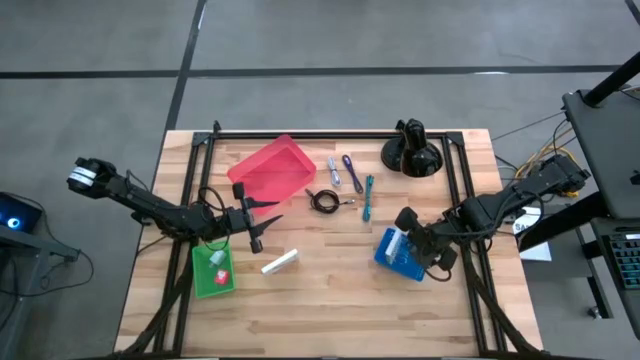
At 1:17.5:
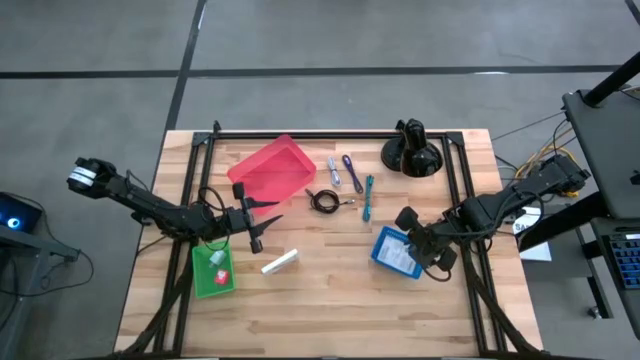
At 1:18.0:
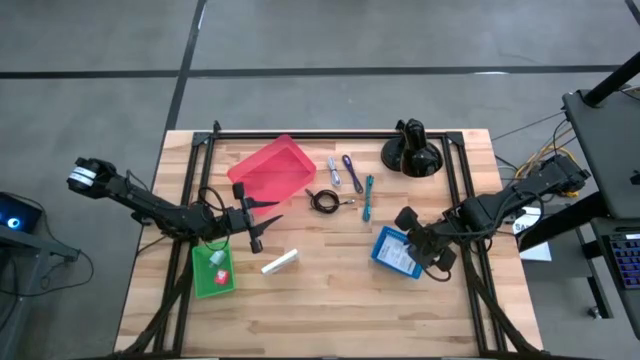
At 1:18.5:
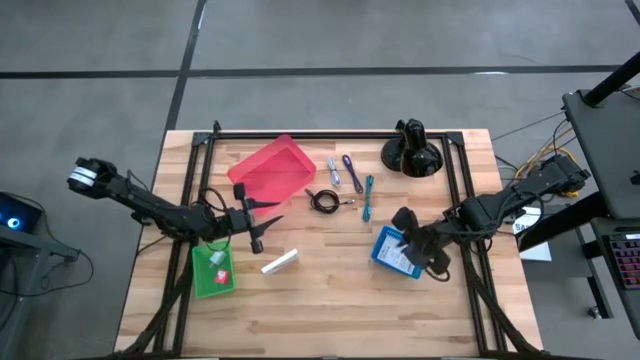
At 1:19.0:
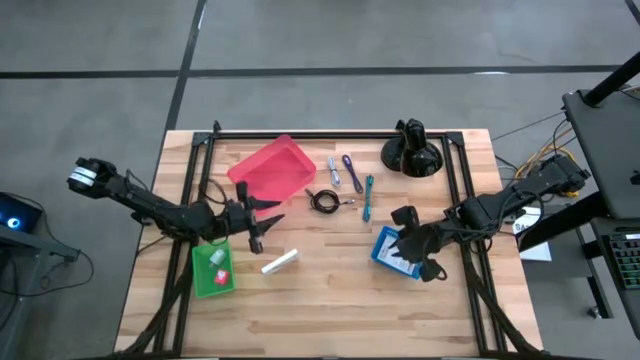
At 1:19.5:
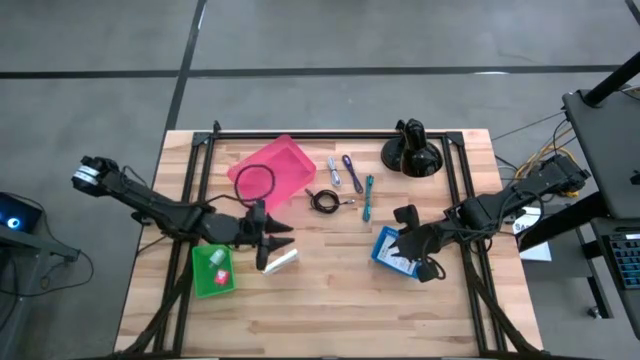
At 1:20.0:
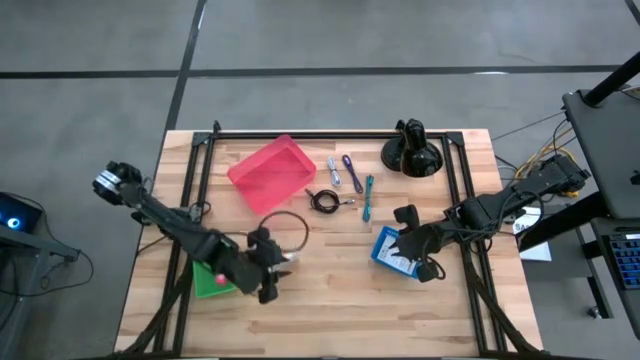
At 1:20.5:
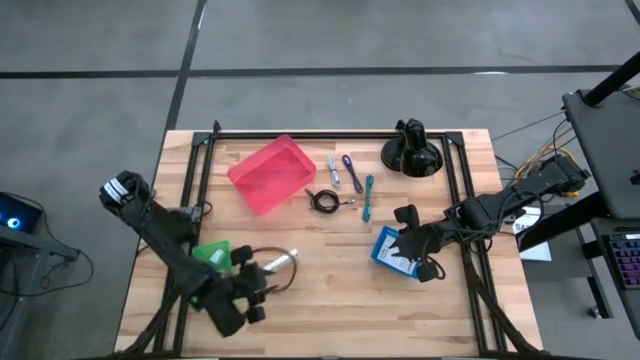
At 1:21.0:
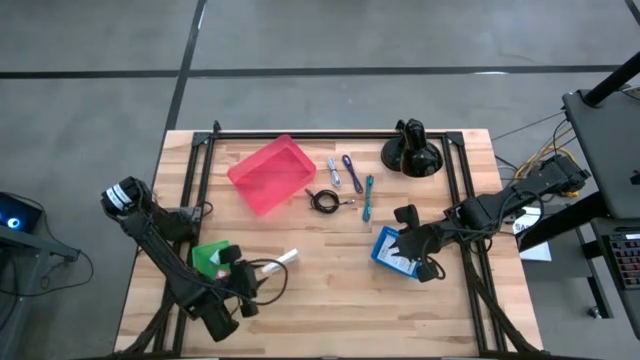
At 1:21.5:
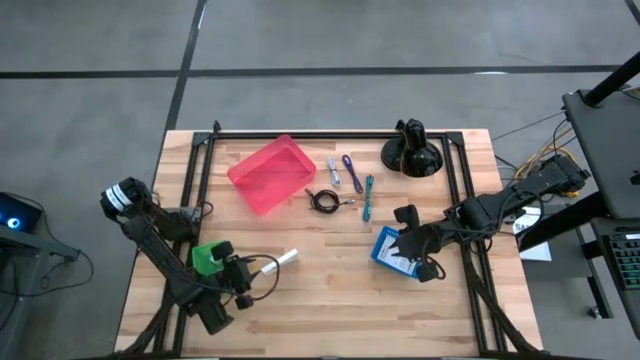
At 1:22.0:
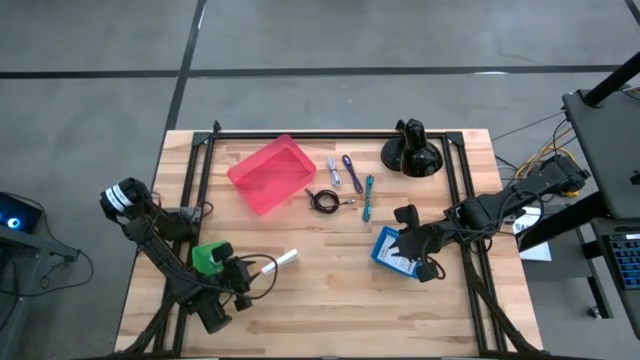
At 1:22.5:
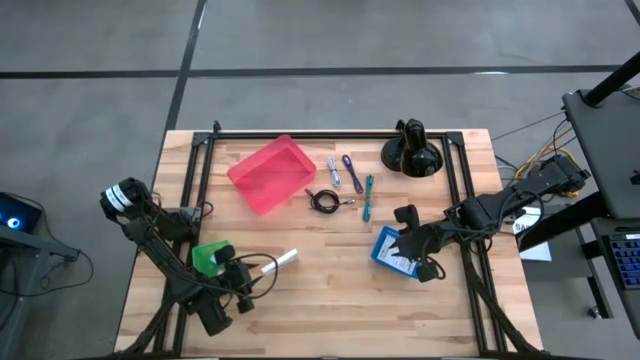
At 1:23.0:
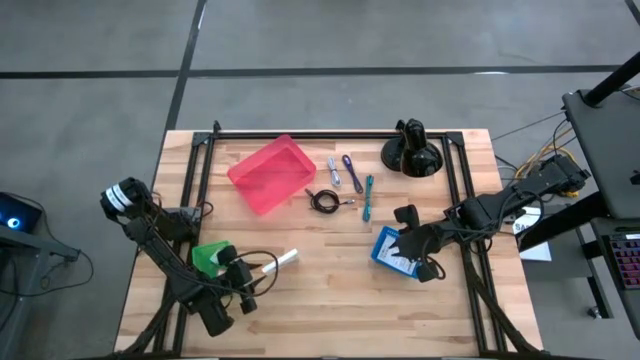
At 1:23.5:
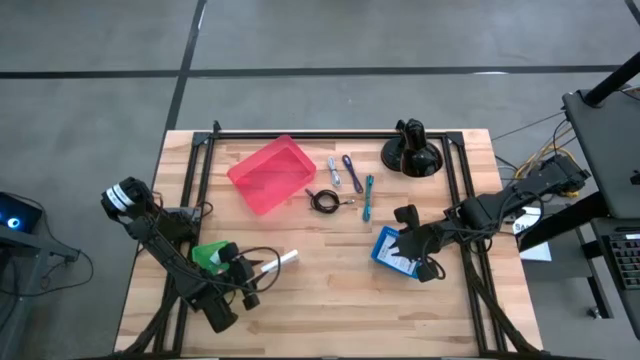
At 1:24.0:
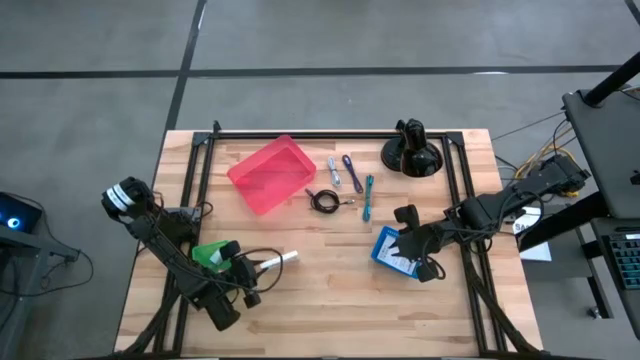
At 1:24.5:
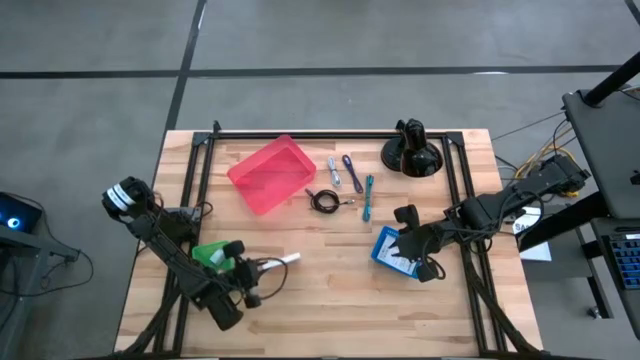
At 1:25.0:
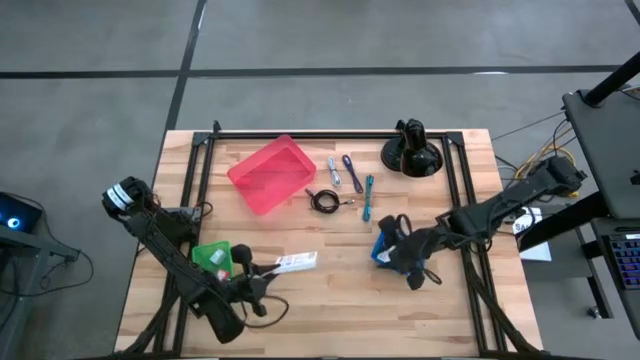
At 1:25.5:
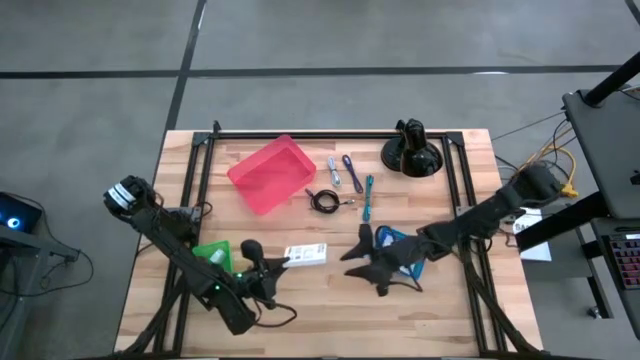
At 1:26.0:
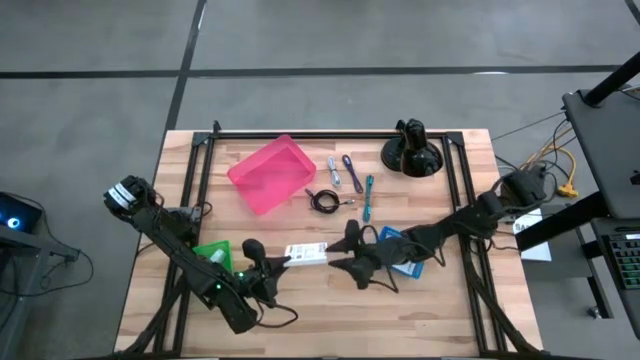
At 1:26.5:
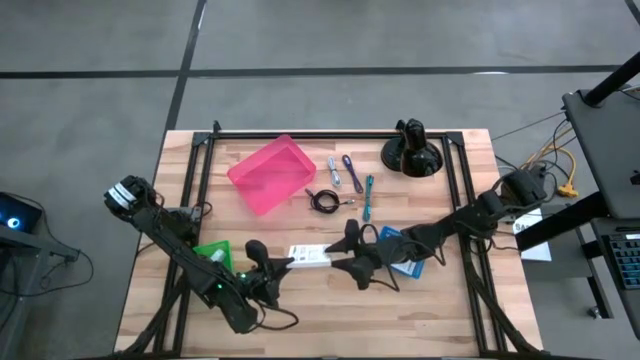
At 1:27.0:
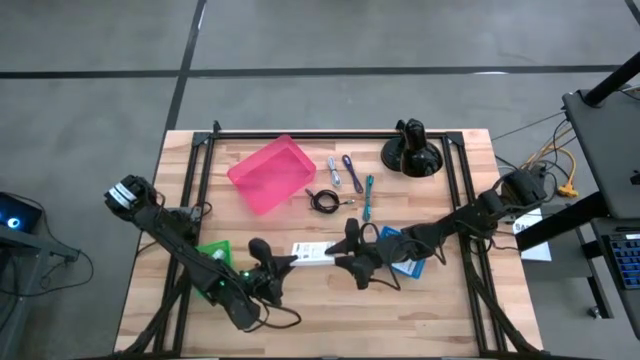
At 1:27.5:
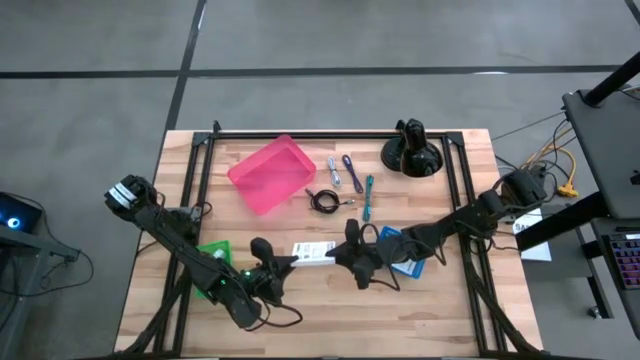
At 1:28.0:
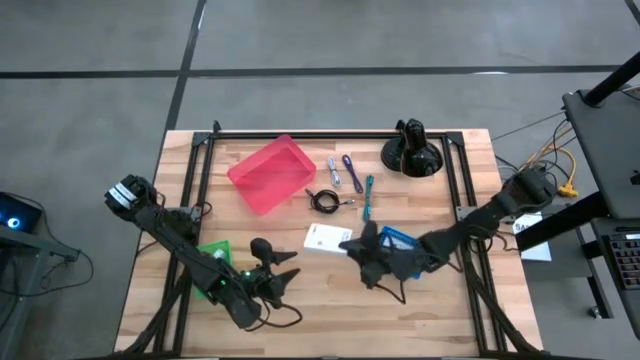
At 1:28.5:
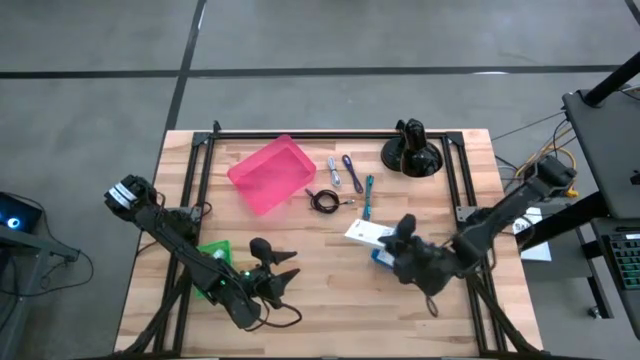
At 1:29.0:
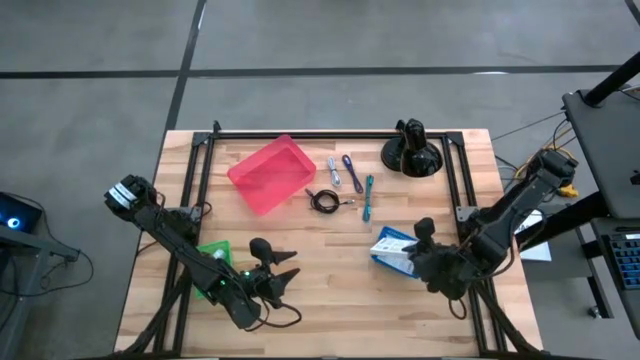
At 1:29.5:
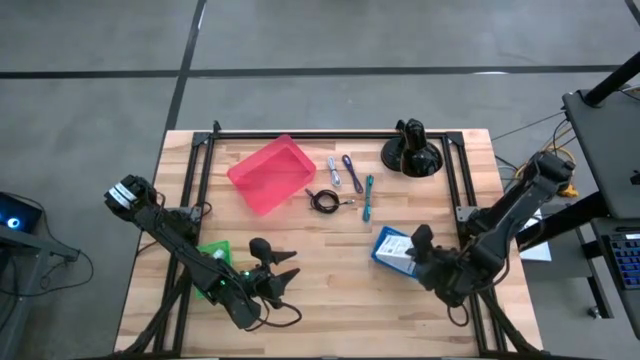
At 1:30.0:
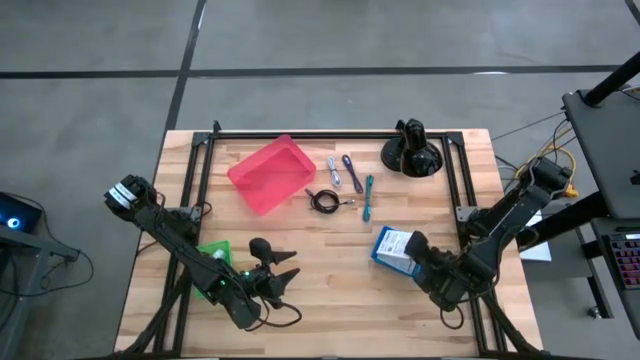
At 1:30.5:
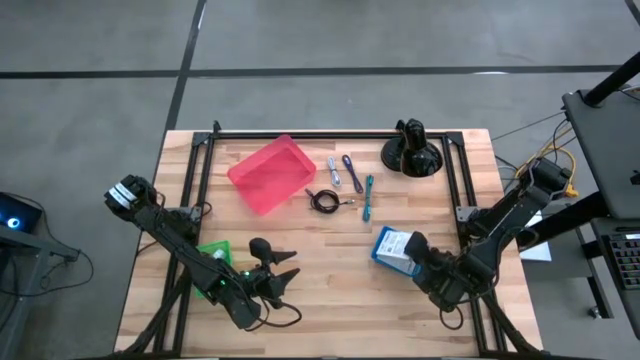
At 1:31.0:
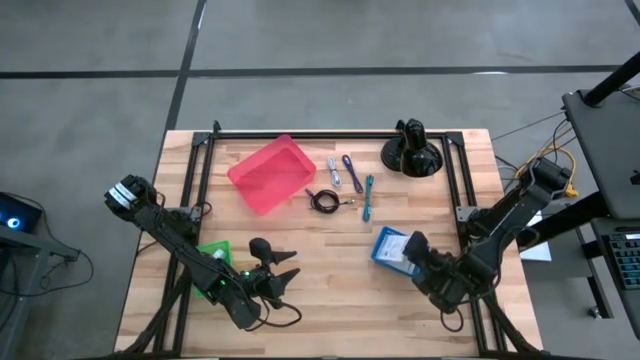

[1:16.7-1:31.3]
Task: Pick and place items into bin
Put the card reader box into the blue bin

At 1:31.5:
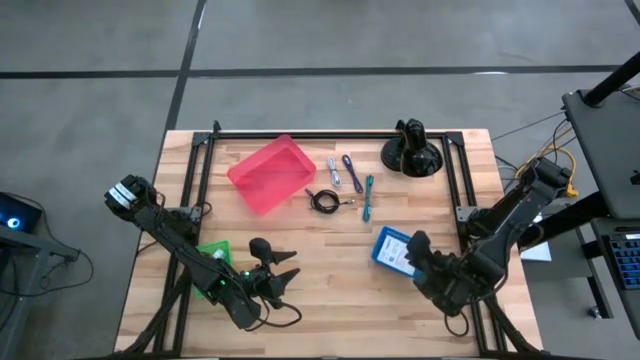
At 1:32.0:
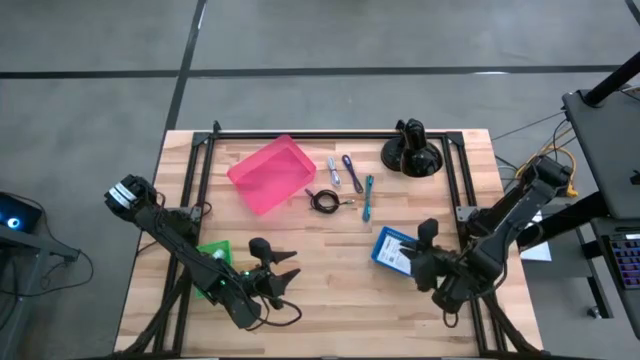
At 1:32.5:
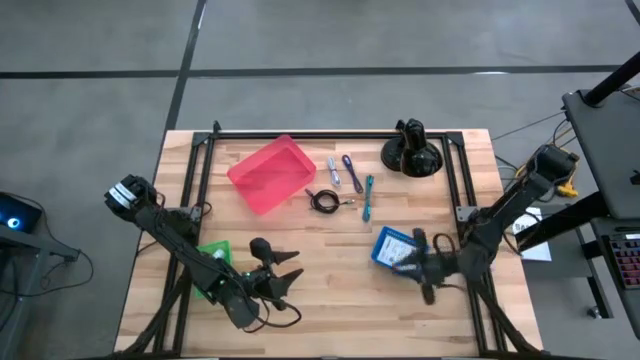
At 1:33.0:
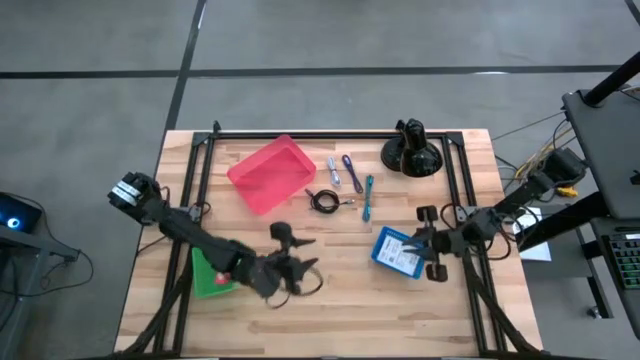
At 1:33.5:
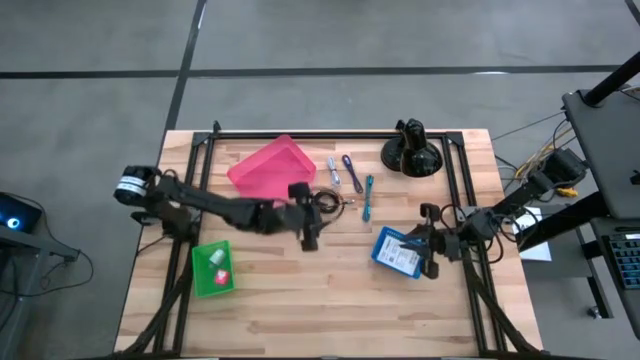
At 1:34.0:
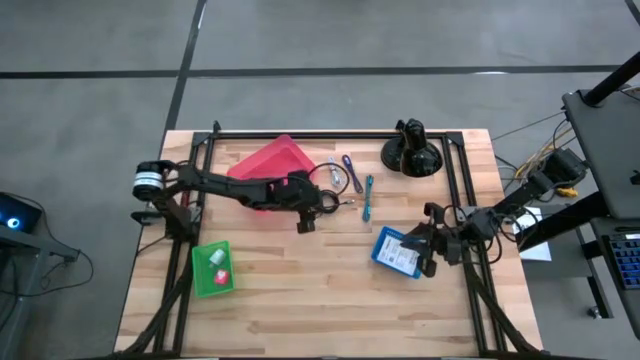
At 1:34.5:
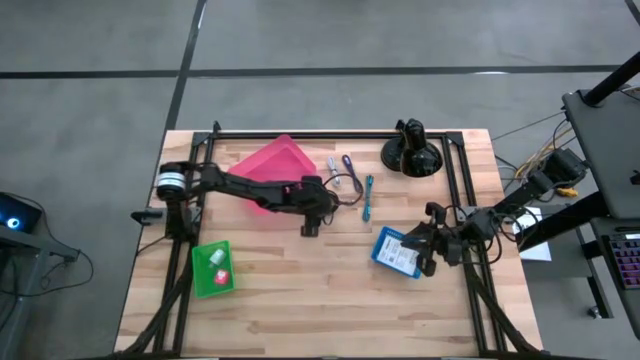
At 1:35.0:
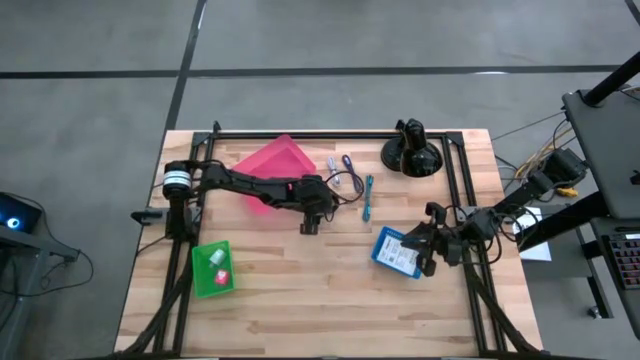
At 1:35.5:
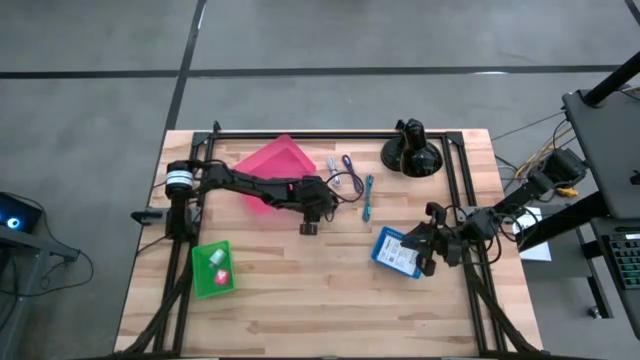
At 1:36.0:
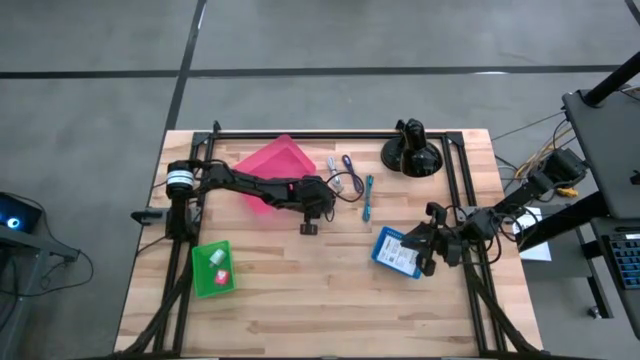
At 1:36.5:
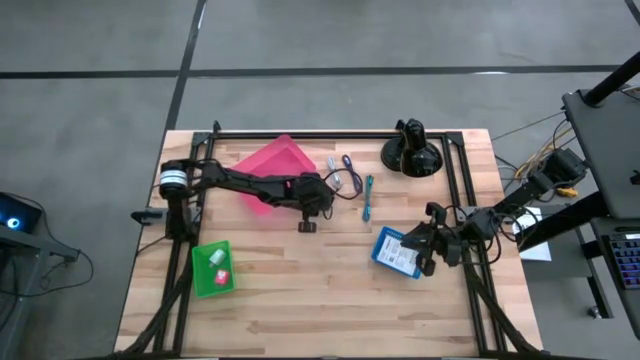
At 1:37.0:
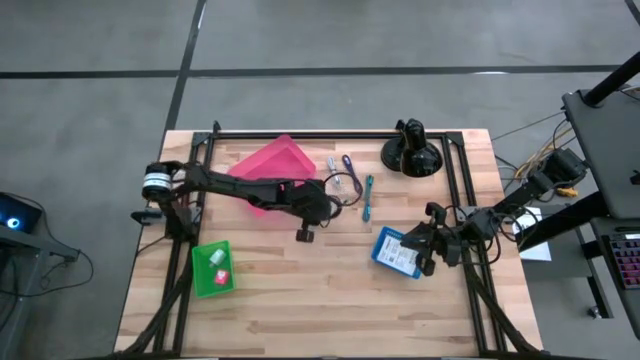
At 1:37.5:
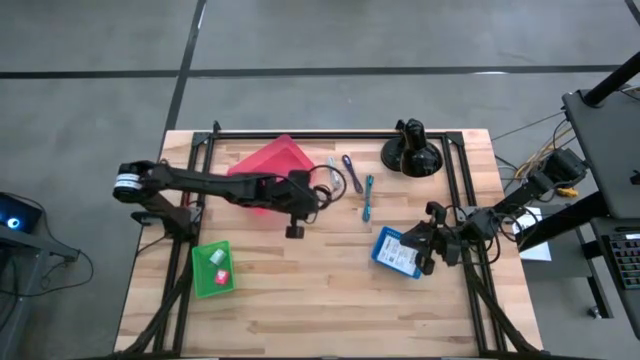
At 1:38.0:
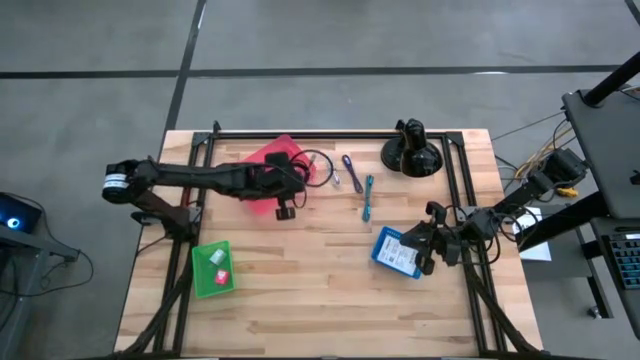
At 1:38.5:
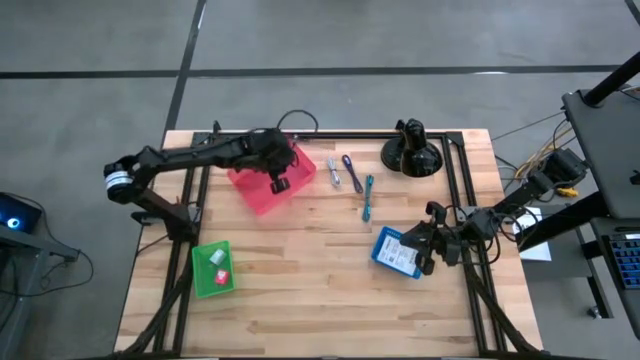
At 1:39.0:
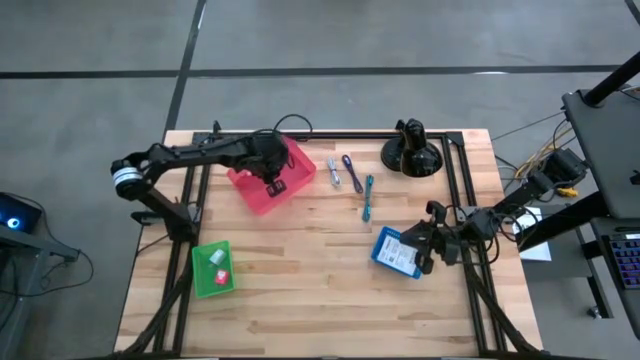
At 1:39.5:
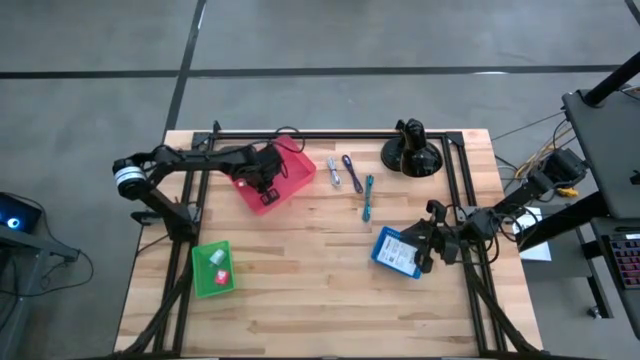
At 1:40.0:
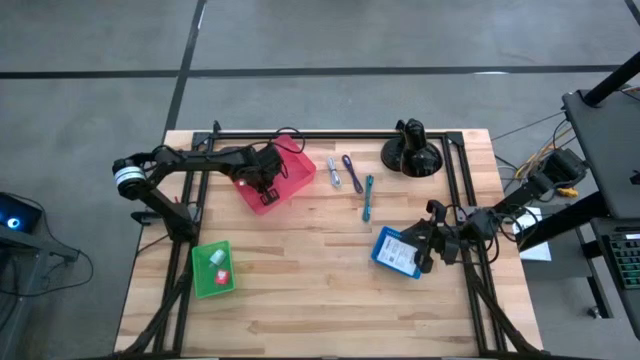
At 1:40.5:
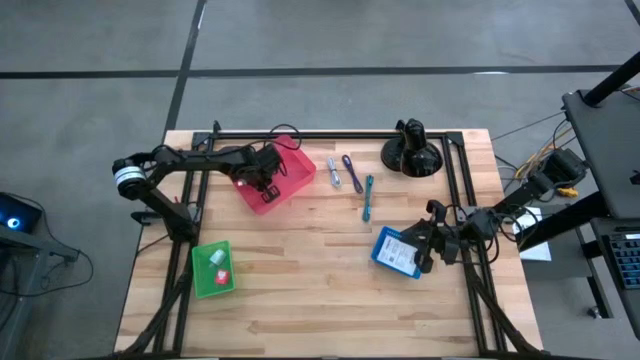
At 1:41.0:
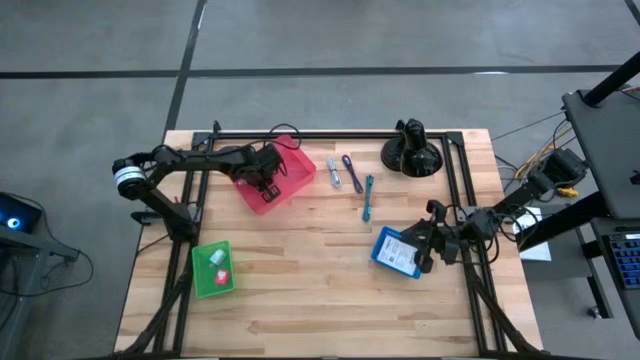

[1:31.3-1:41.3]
Put the black charger cable into the red bin
